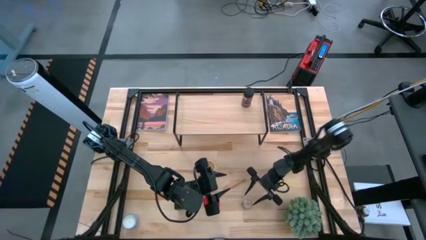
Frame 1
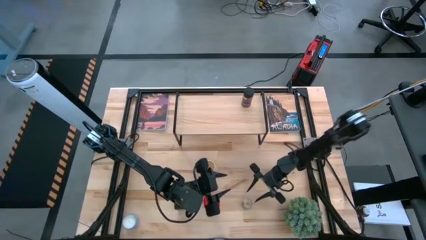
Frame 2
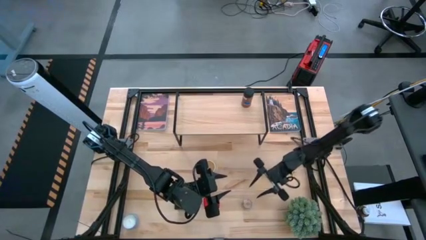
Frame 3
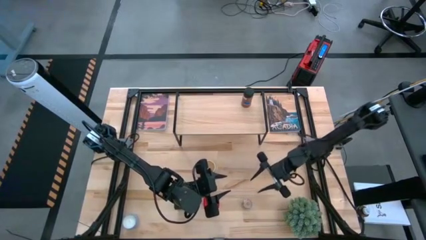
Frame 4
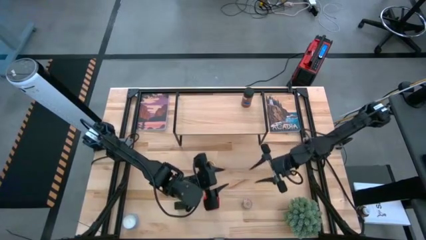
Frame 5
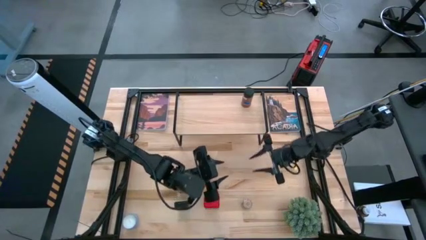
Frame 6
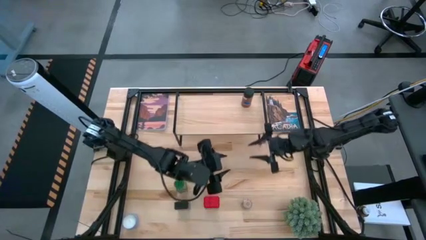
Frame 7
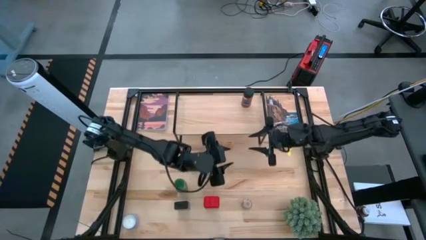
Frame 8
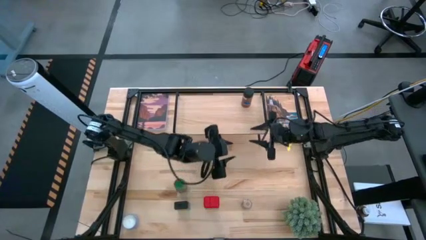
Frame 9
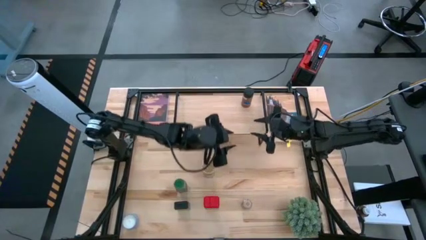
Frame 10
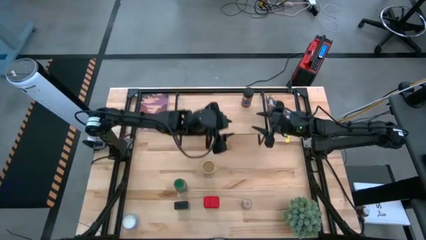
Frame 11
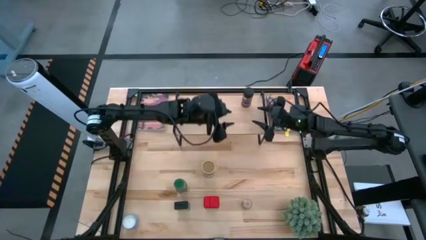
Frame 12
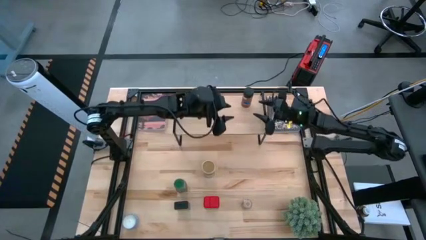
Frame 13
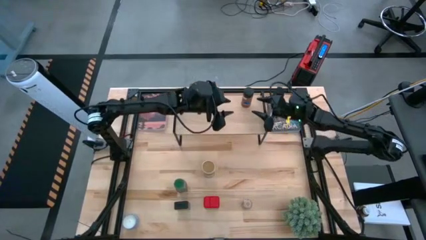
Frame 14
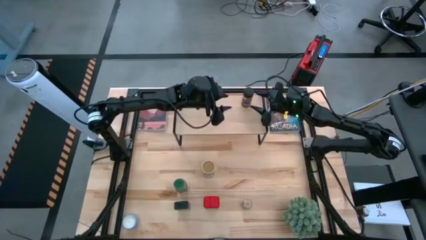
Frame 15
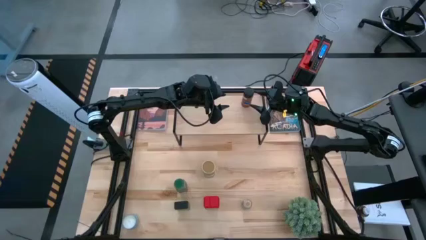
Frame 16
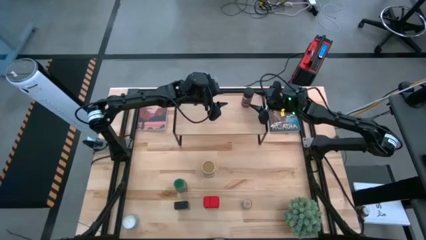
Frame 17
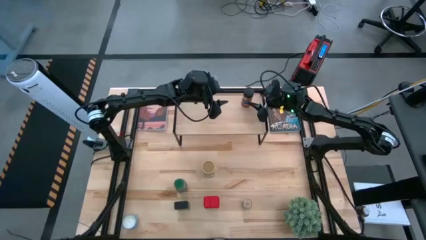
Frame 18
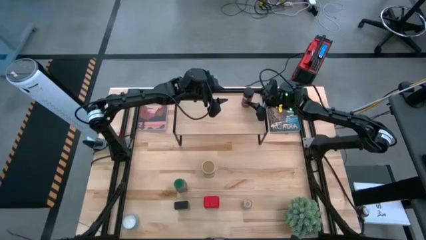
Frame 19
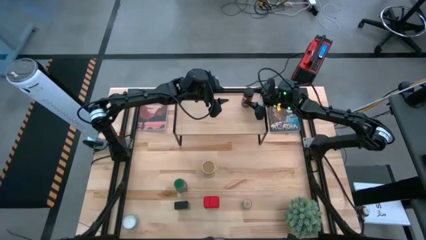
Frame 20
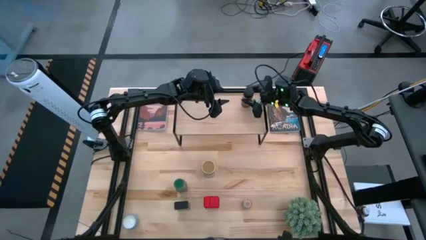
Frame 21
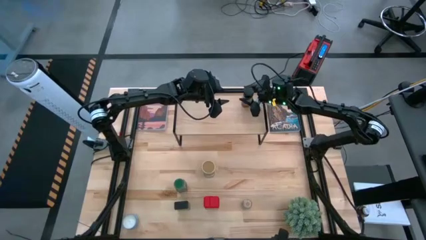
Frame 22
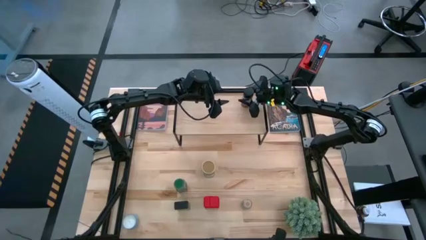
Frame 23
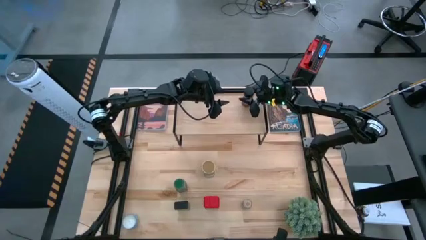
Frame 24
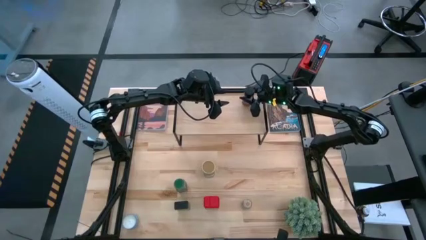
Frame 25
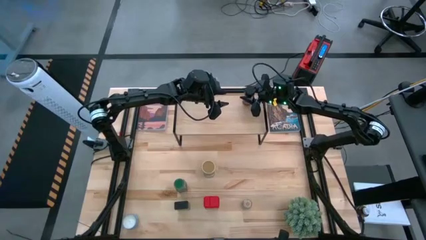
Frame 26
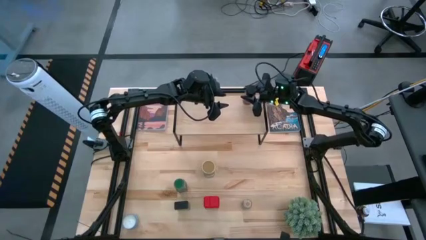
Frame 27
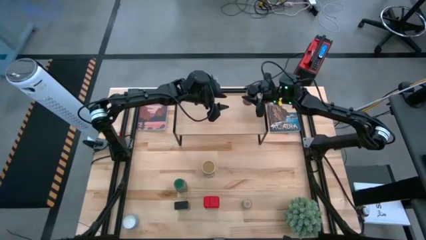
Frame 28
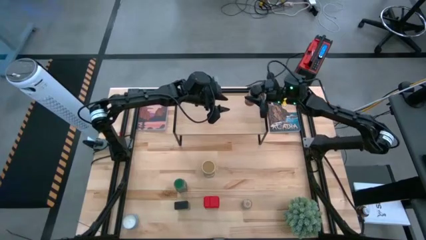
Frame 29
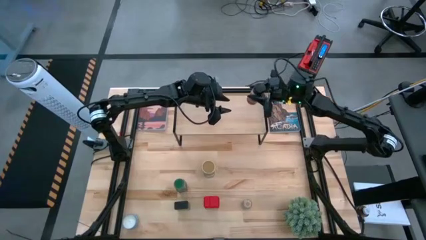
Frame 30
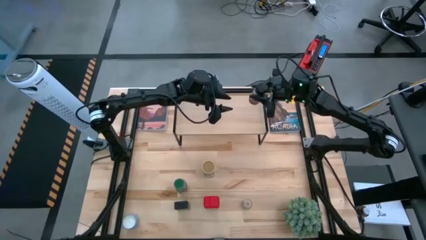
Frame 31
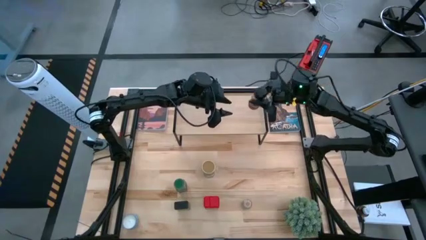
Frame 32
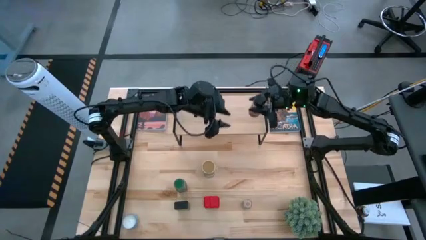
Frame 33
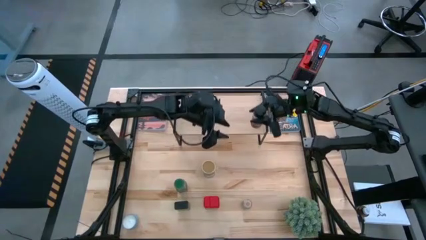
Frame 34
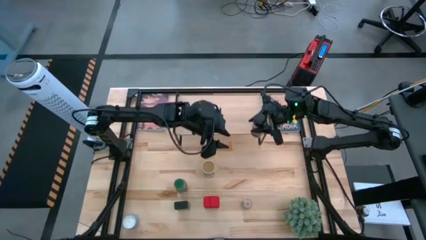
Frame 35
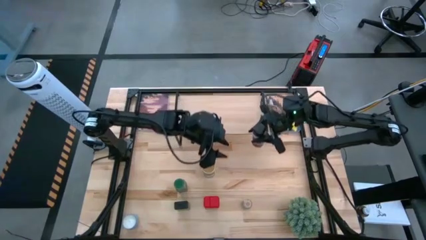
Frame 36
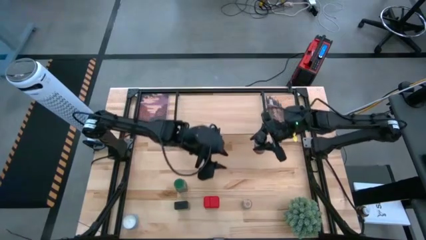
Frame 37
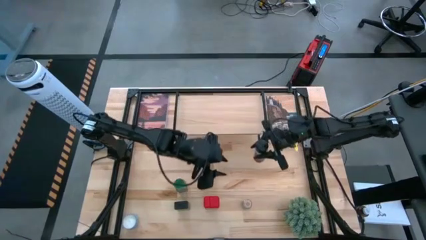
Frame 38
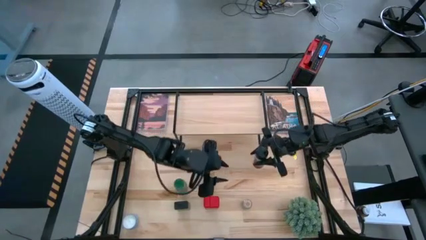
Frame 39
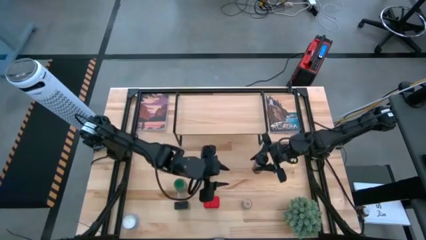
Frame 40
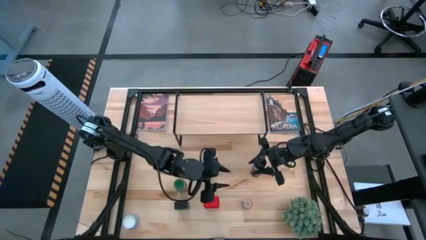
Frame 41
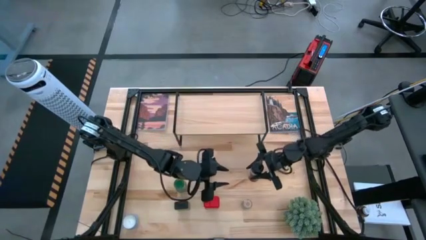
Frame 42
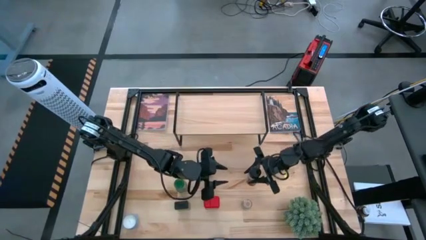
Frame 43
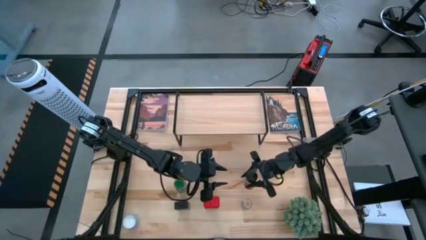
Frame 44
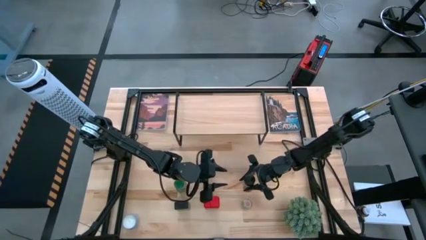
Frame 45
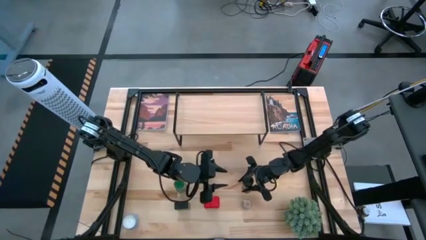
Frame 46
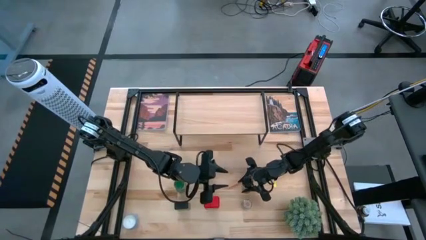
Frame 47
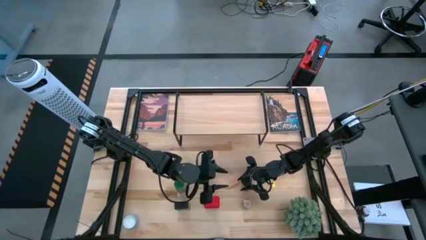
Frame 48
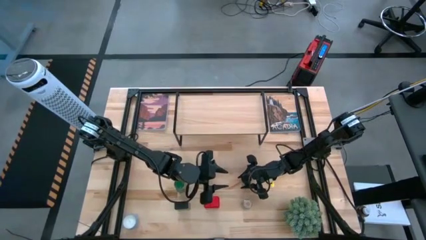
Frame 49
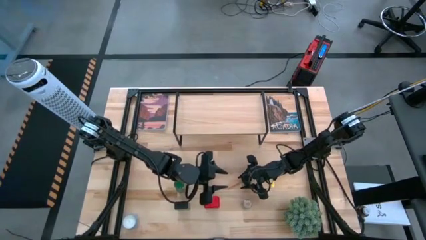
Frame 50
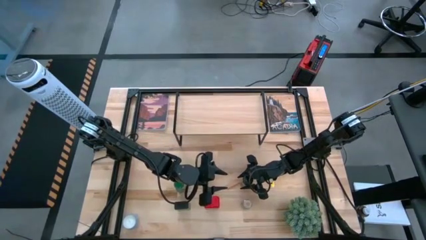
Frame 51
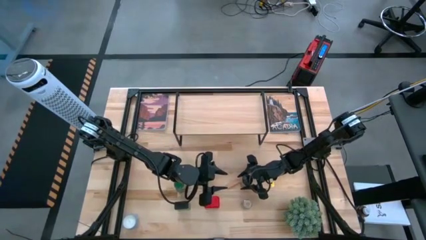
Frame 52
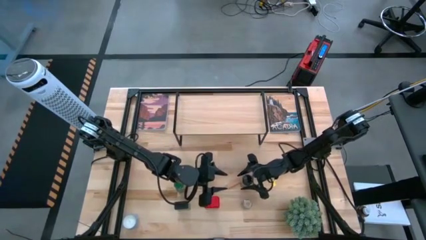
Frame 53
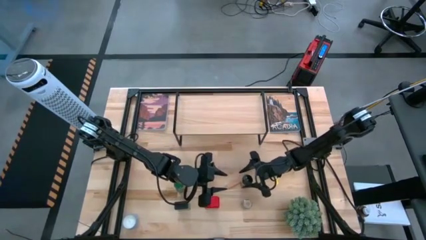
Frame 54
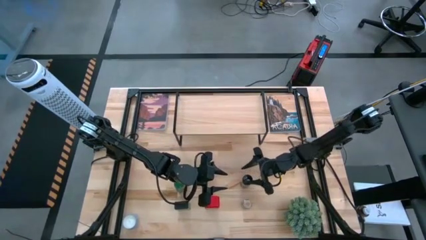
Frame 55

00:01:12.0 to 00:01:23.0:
Task: Shelf spices
Remove the black seasoning bottle from the shelf

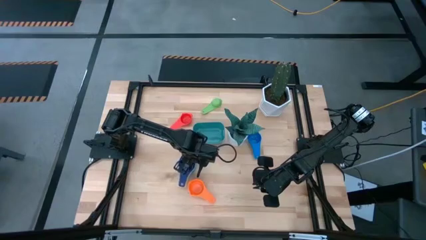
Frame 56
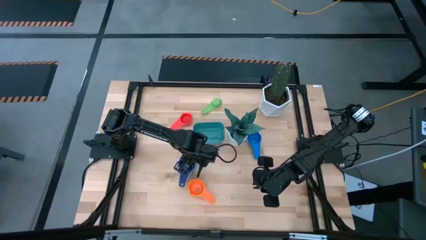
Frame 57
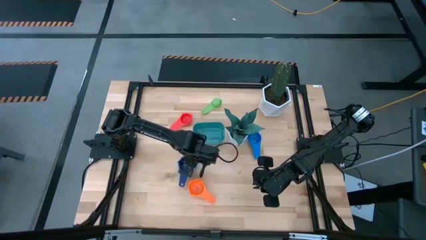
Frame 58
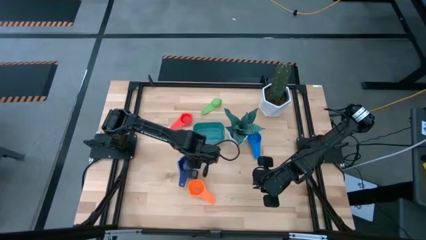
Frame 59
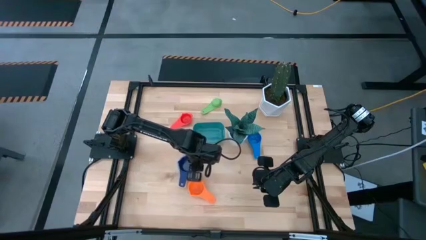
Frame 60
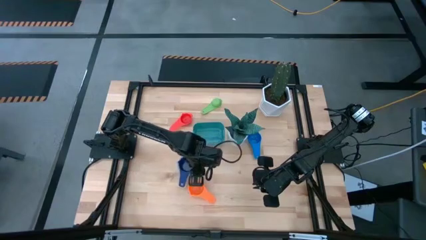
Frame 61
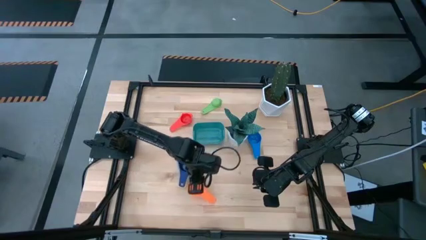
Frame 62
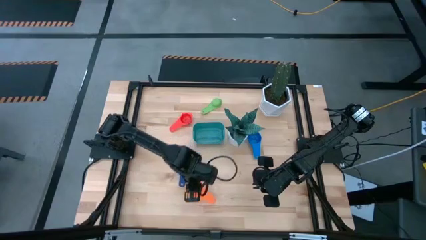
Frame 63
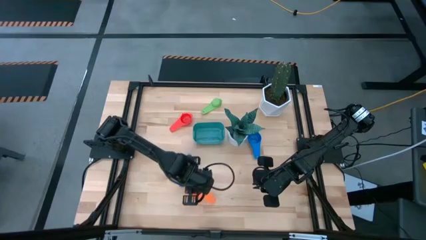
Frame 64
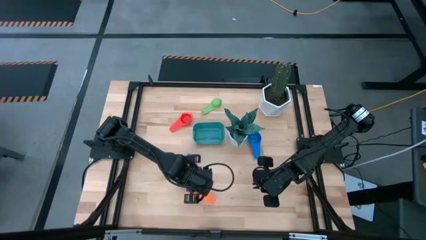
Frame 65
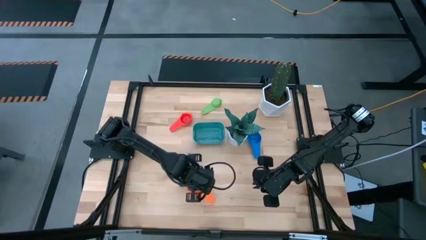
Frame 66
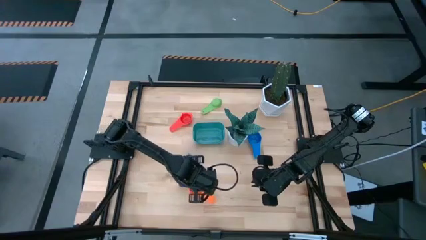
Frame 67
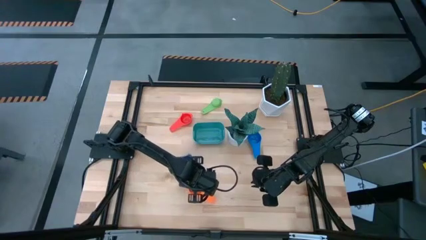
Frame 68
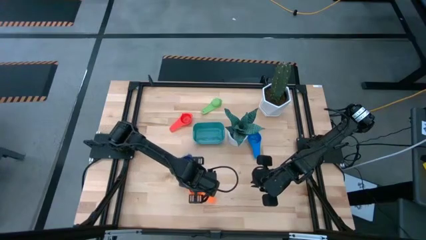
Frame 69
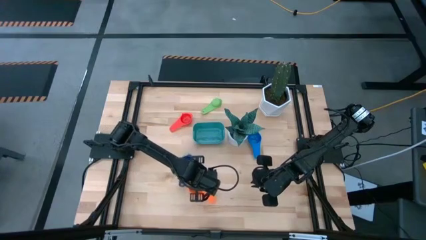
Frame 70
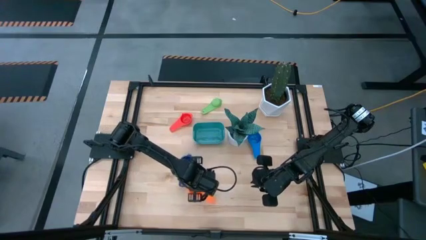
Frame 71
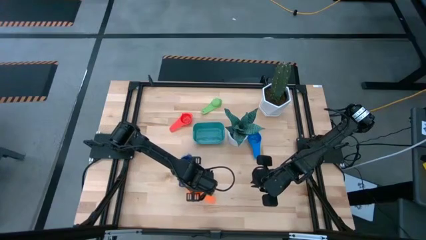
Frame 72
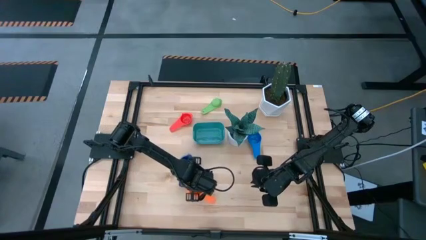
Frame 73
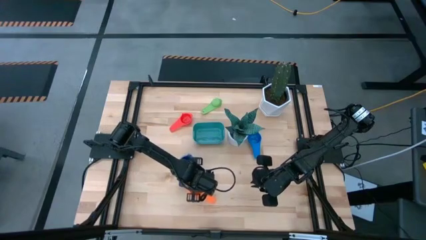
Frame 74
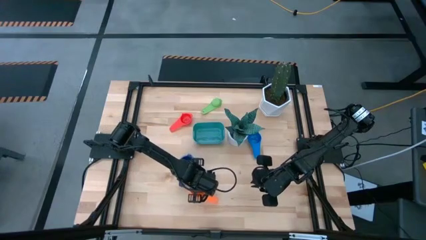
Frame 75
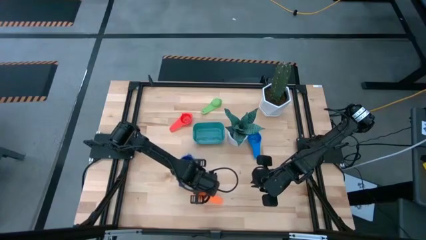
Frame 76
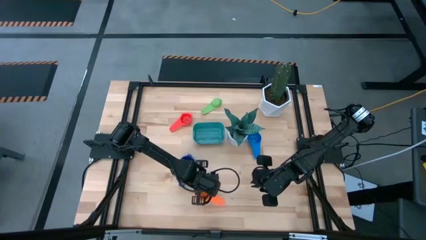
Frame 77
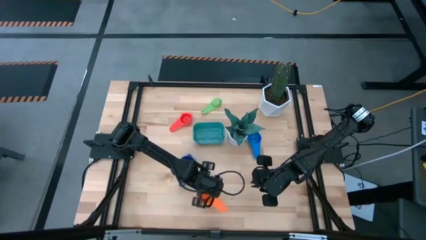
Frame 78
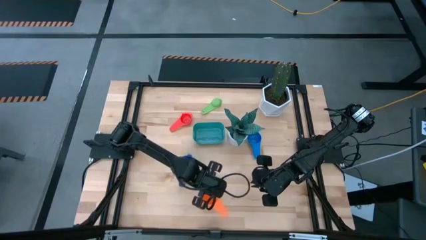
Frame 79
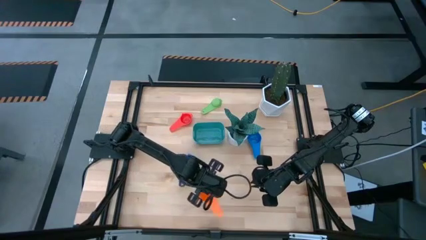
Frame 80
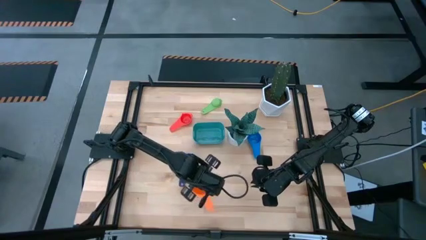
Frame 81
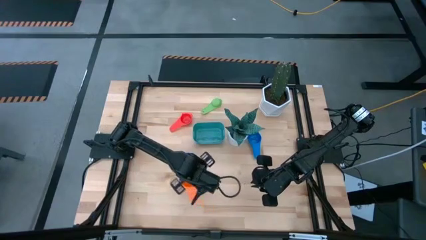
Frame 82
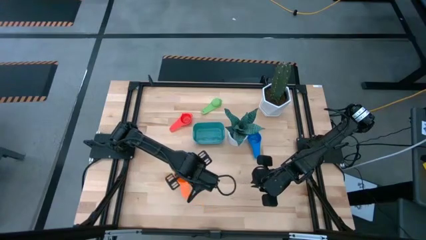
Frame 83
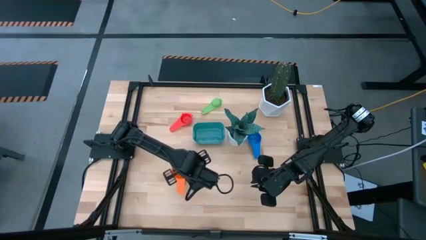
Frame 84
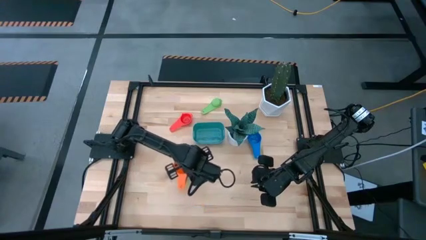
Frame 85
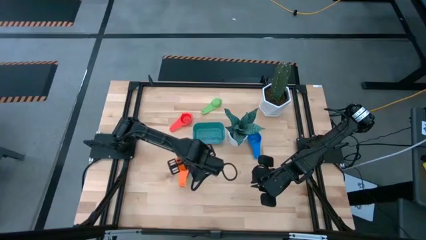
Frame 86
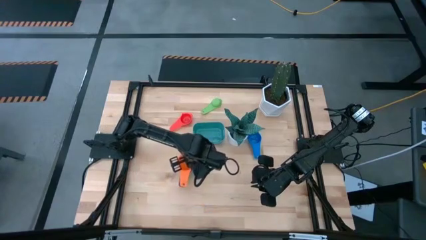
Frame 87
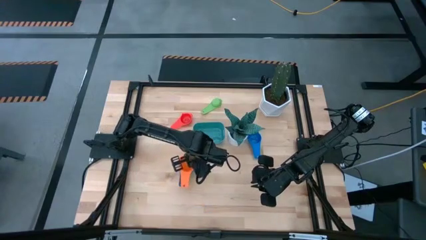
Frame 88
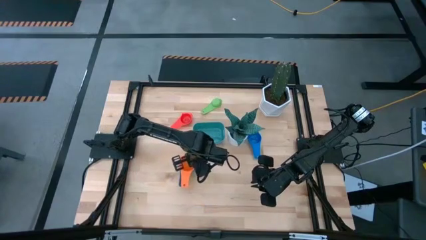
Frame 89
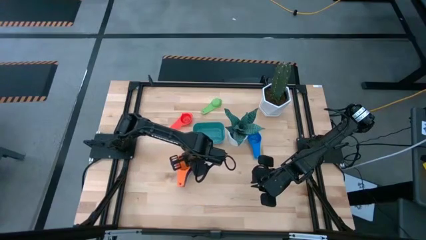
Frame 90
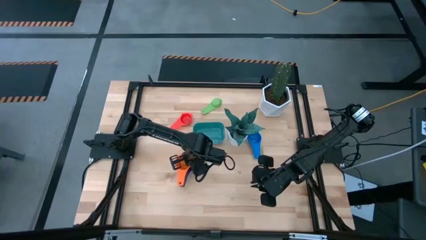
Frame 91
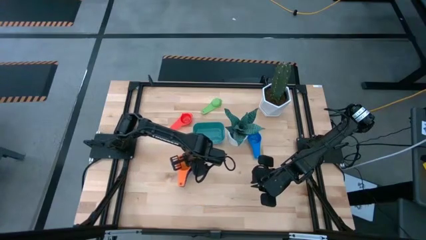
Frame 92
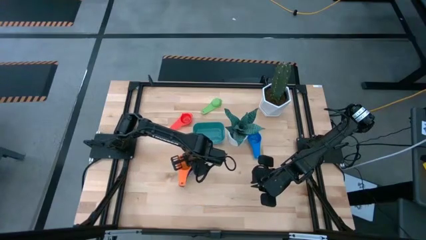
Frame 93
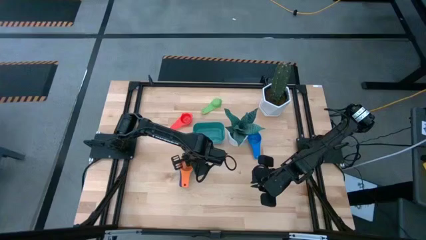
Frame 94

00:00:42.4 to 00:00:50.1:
Task: Nest measuring cups in basket
Stack the orange measuring cup on top of the dark blue measuring cup
